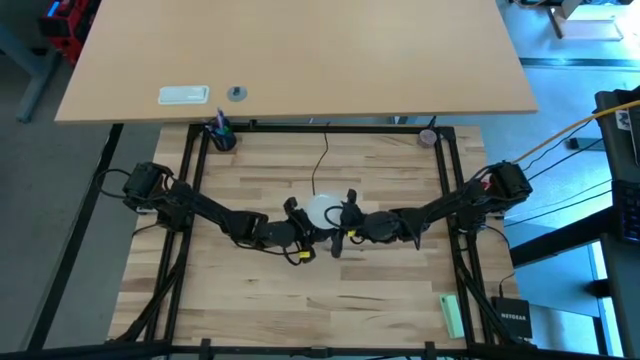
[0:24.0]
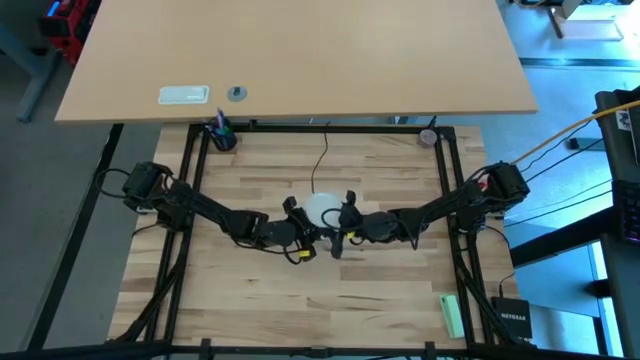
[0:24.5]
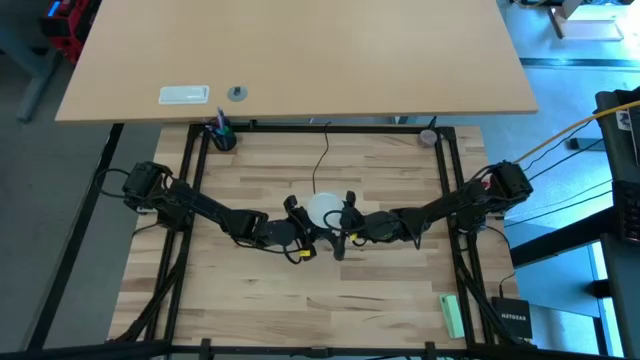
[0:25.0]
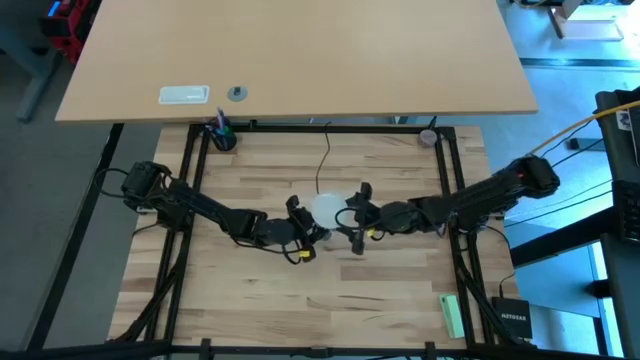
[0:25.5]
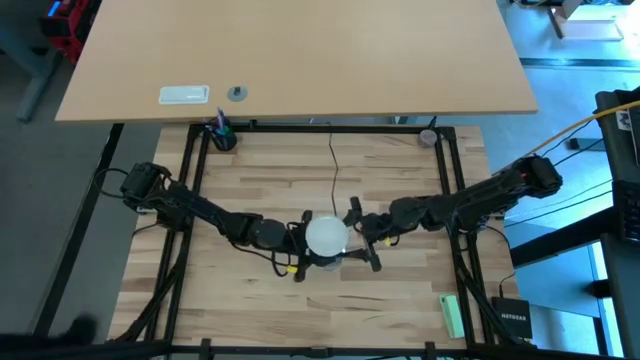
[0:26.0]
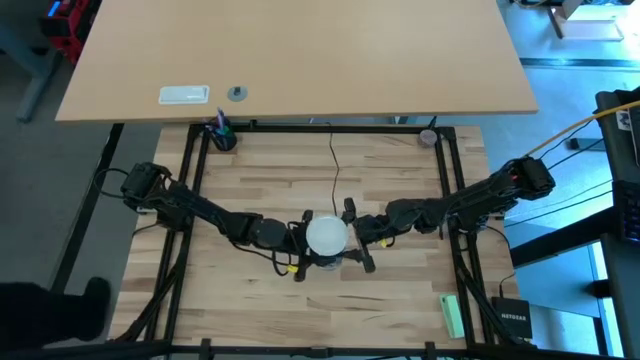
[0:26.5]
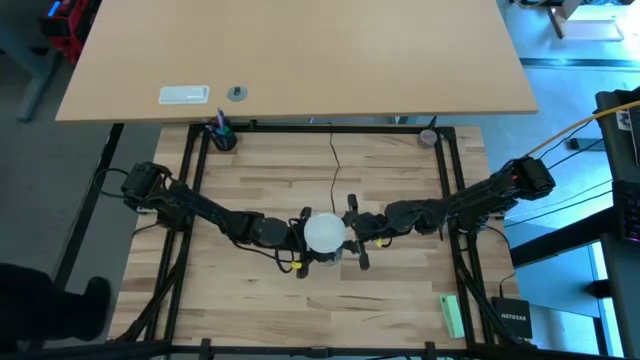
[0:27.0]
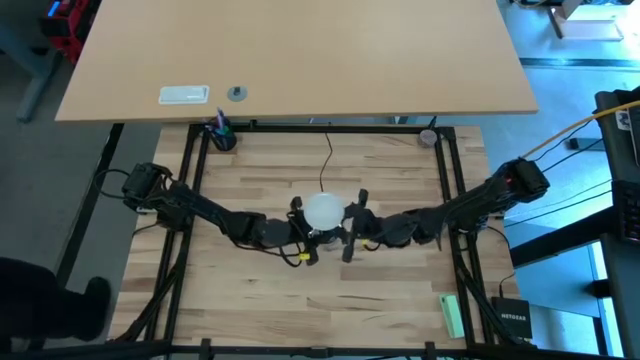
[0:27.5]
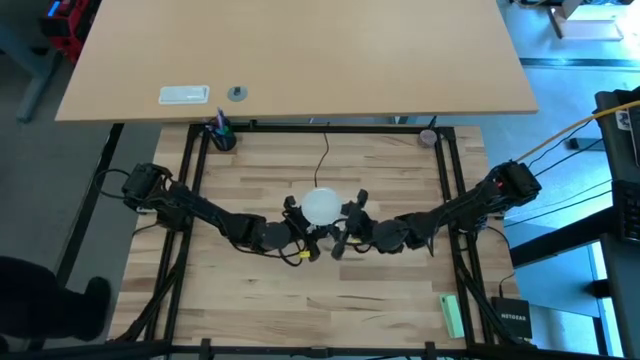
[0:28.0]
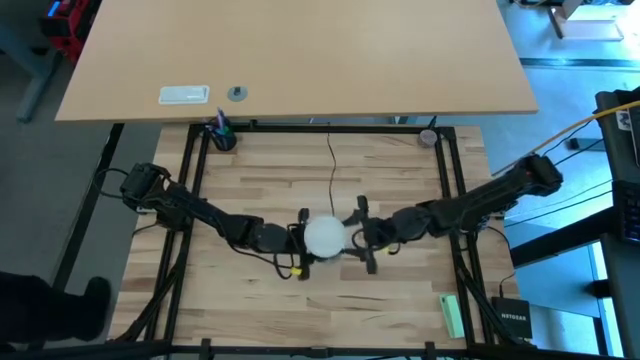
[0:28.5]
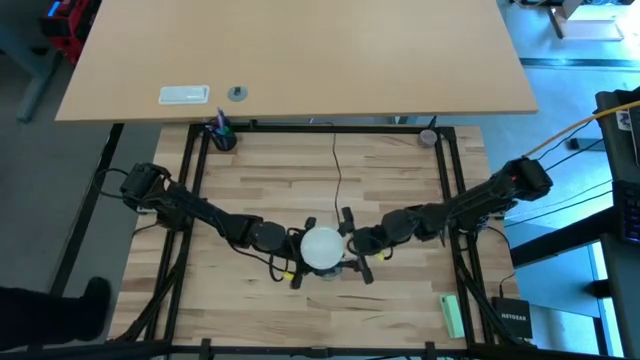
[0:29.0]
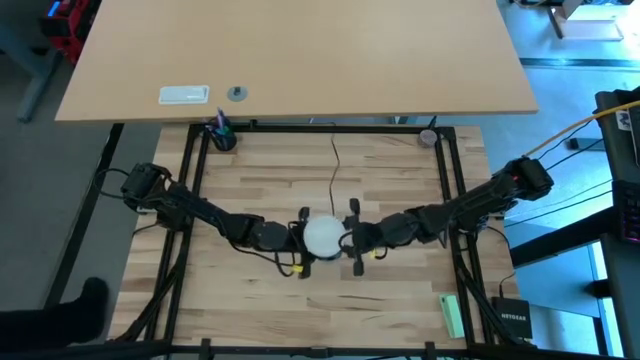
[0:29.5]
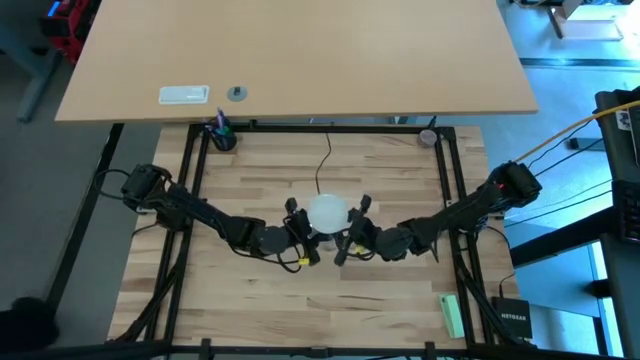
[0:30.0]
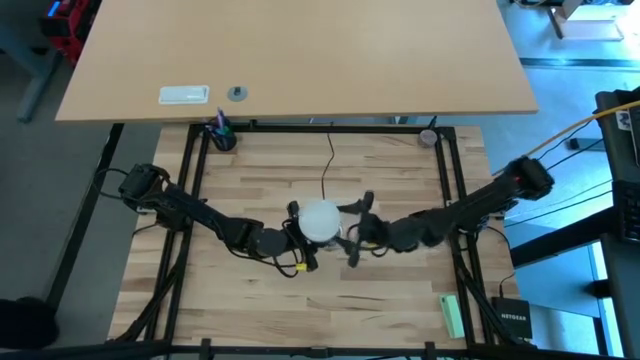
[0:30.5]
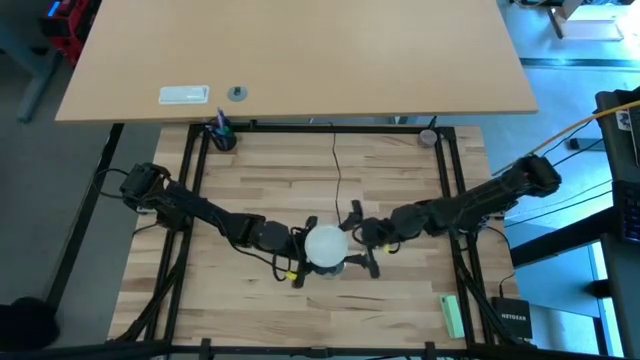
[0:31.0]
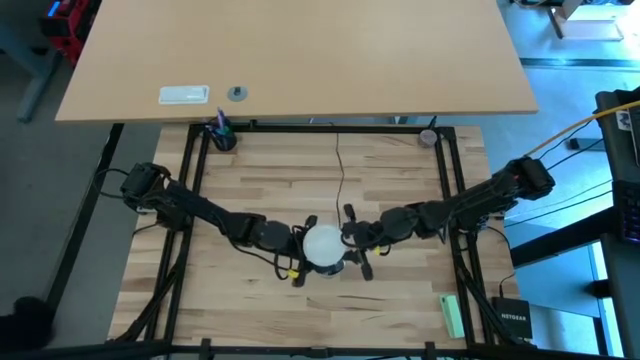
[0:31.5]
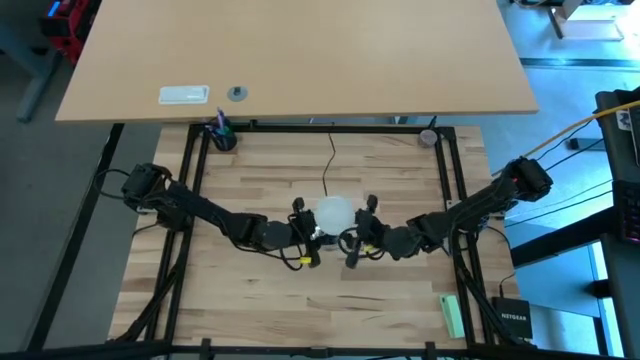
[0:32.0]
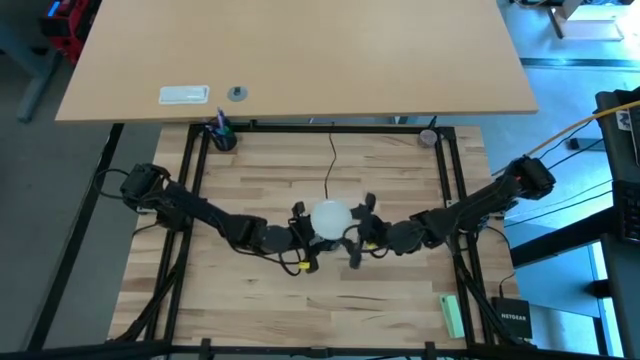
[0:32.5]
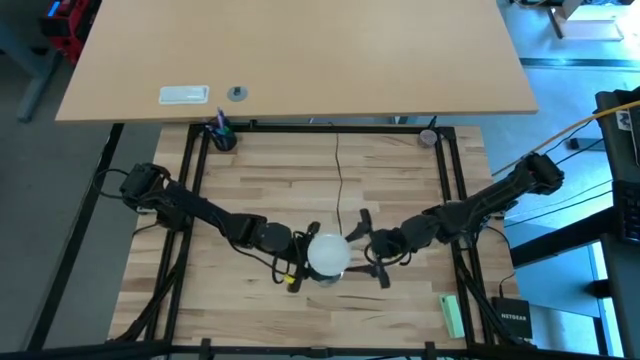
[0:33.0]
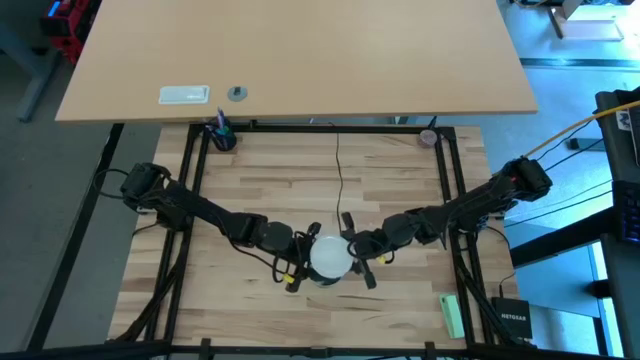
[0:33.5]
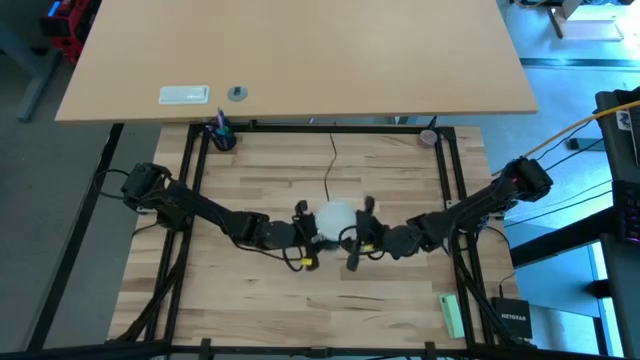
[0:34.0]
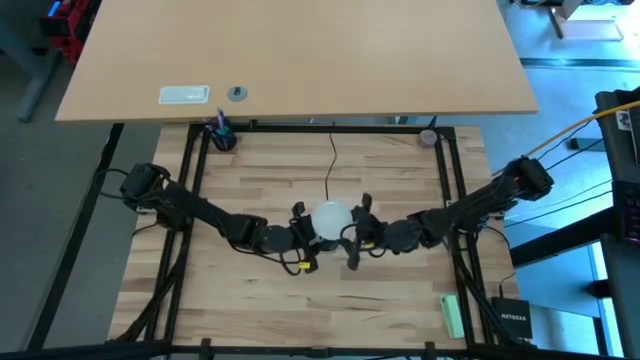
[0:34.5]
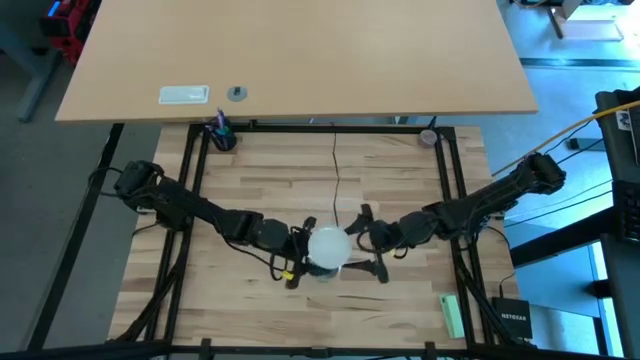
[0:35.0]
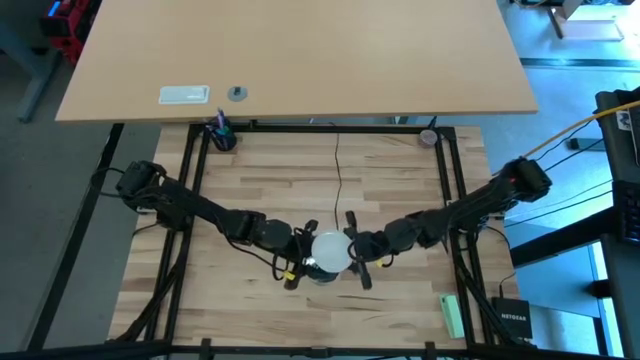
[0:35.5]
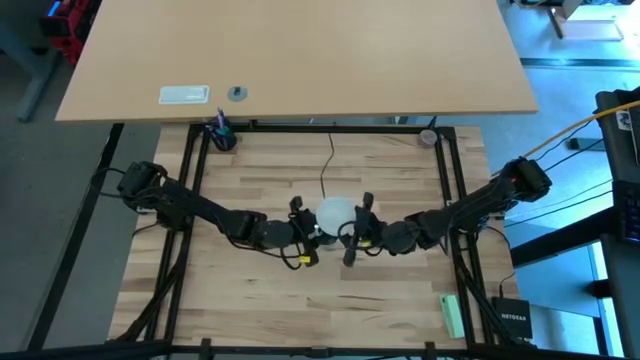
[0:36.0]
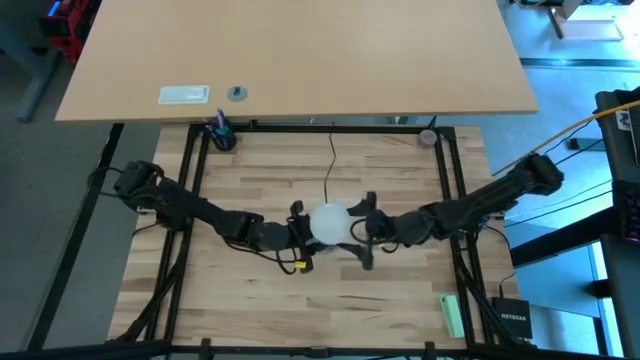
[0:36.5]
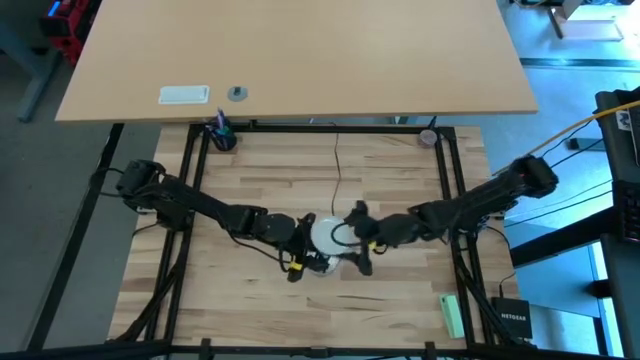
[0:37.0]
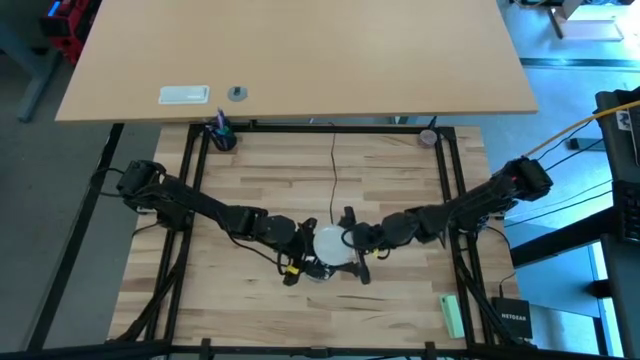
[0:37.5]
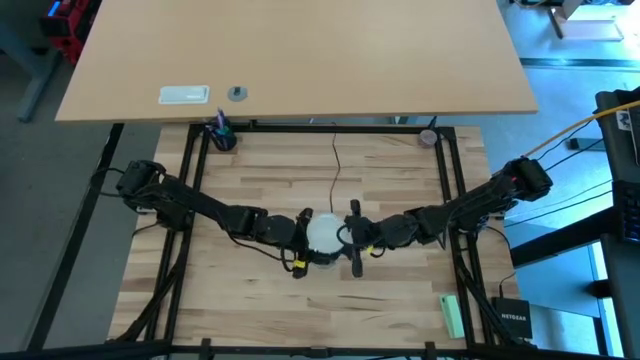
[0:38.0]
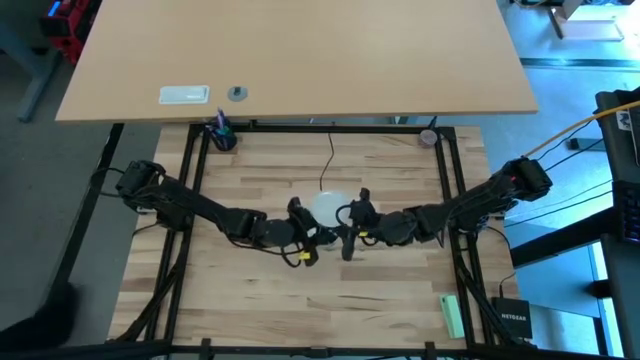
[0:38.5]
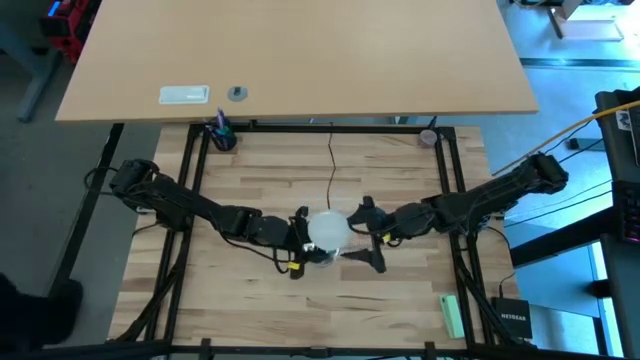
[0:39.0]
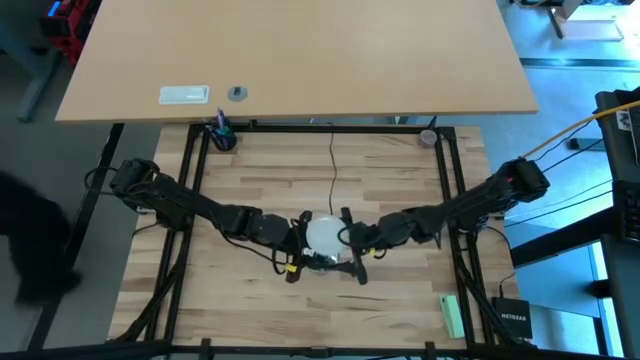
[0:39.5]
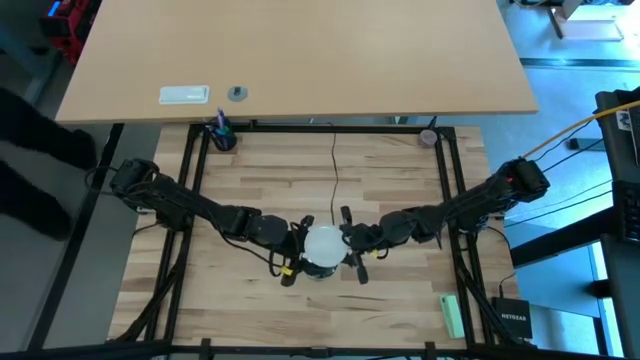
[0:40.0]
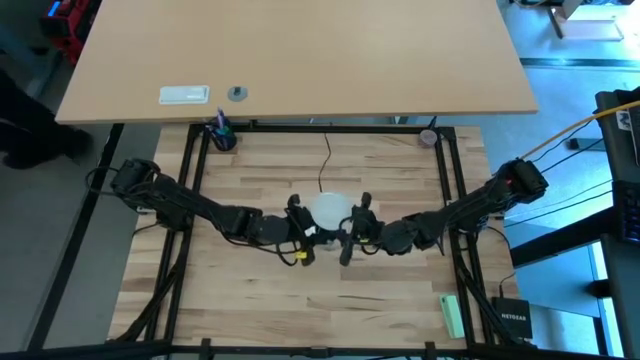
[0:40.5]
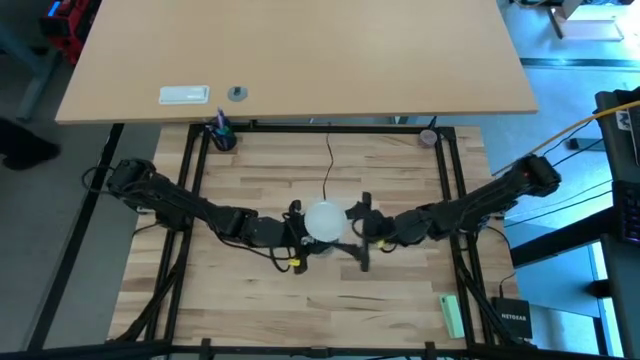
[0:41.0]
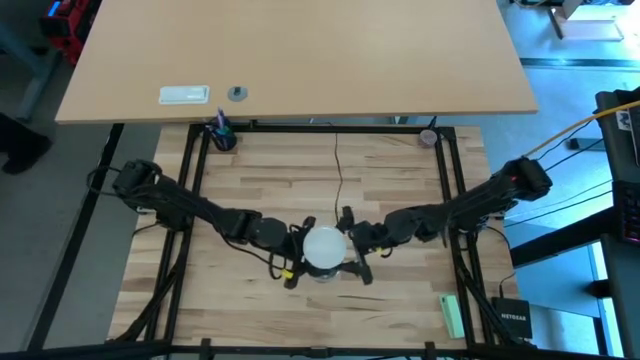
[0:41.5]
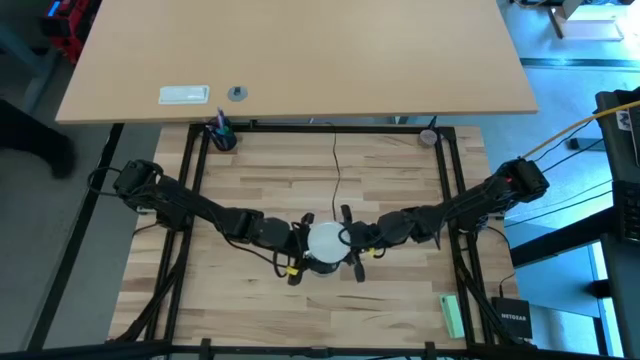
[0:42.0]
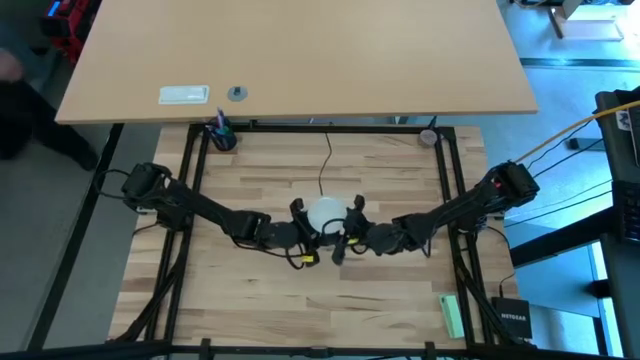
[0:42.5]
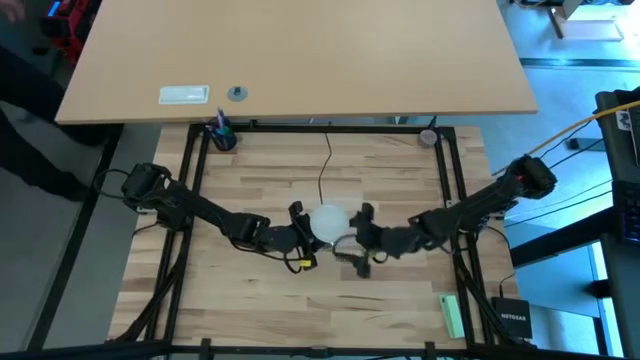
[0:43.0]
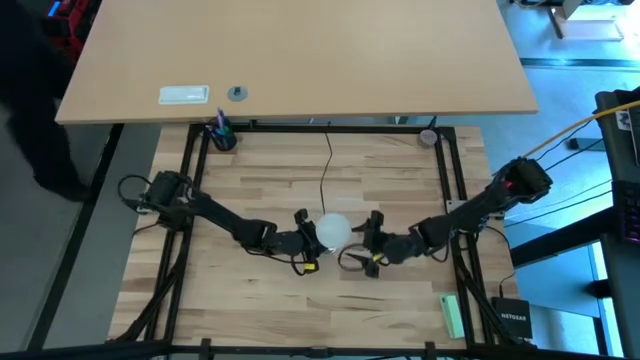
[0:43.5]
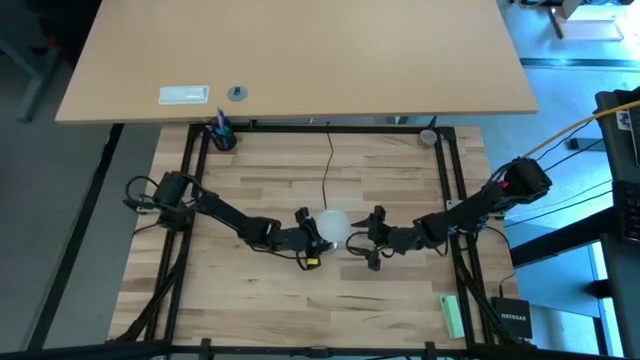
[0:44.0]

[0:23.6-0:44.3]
Task: Screw lightbulb
Insert the lightbulb into the lamp
